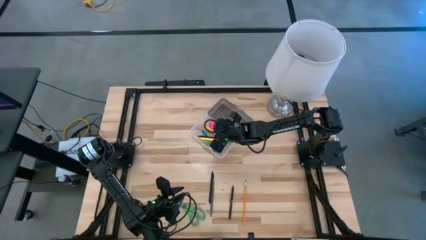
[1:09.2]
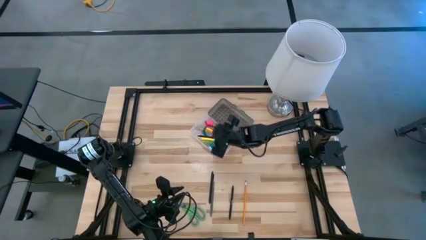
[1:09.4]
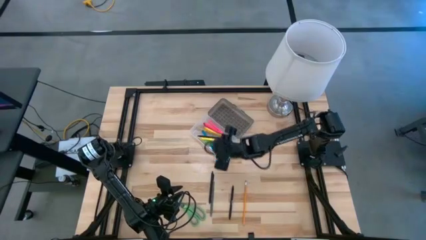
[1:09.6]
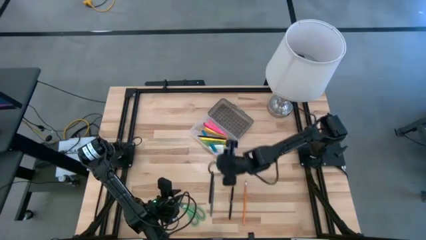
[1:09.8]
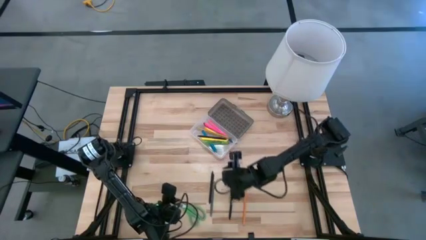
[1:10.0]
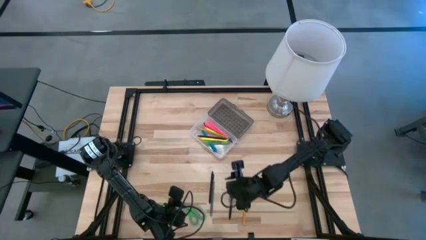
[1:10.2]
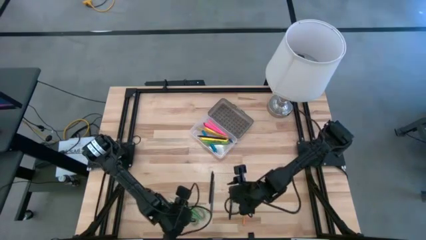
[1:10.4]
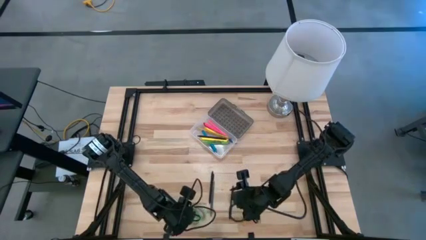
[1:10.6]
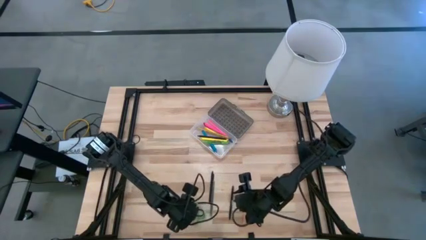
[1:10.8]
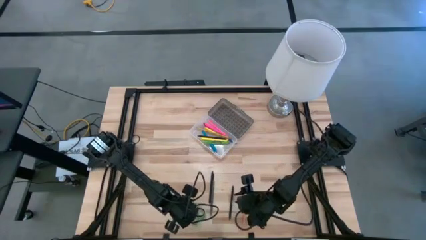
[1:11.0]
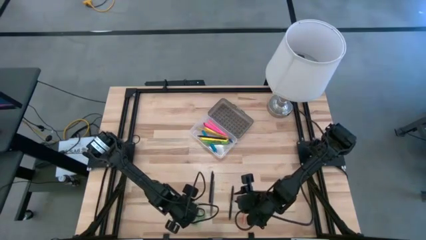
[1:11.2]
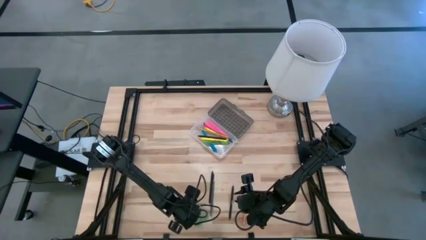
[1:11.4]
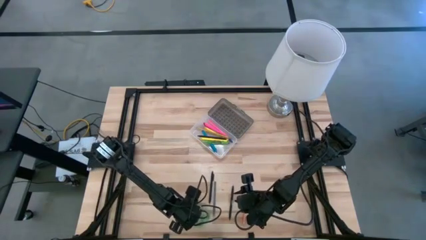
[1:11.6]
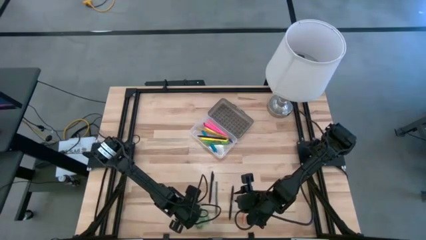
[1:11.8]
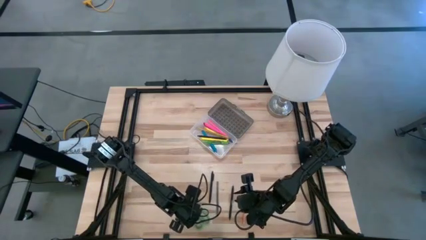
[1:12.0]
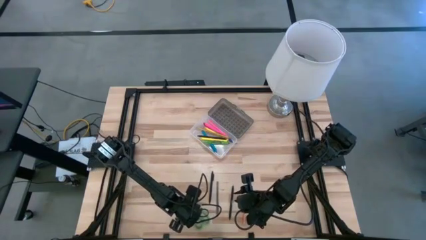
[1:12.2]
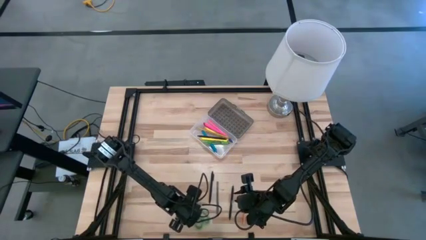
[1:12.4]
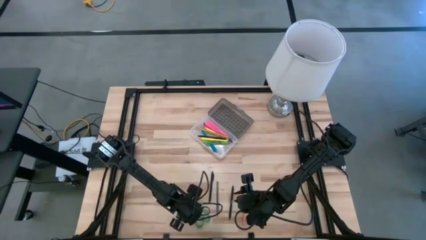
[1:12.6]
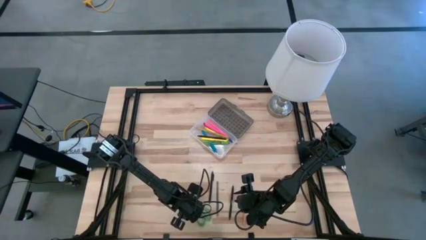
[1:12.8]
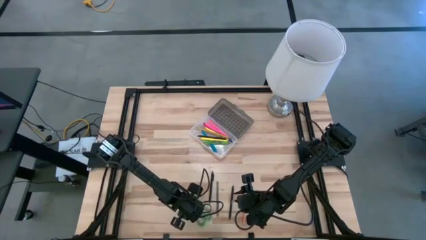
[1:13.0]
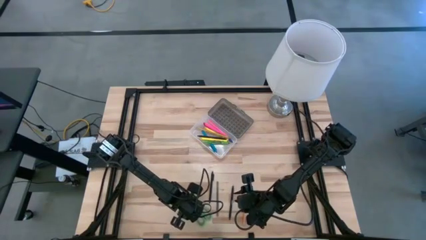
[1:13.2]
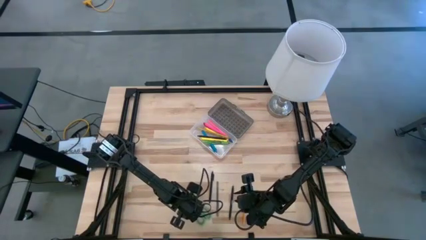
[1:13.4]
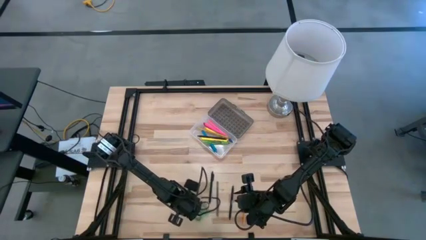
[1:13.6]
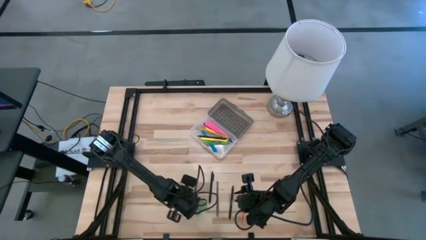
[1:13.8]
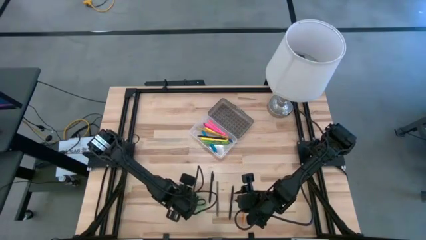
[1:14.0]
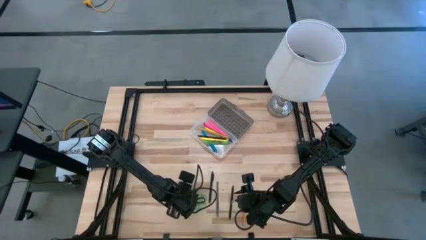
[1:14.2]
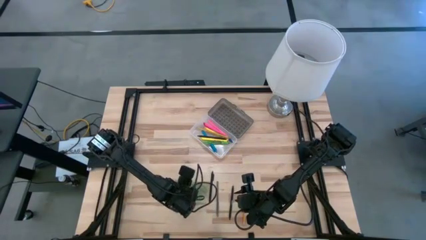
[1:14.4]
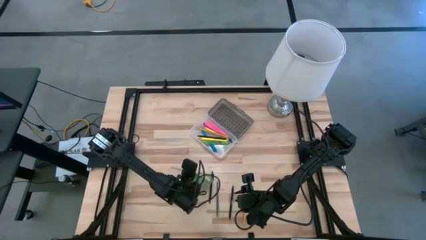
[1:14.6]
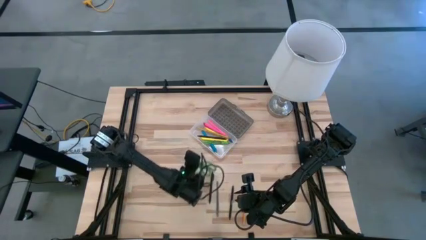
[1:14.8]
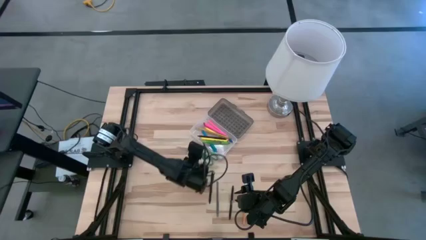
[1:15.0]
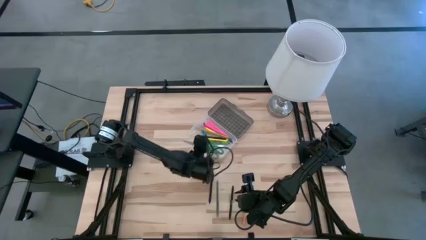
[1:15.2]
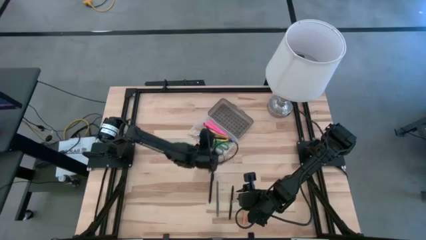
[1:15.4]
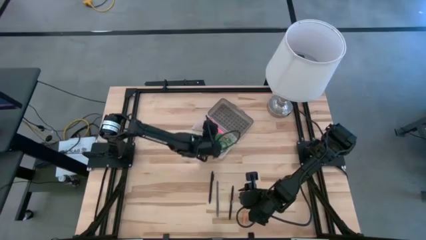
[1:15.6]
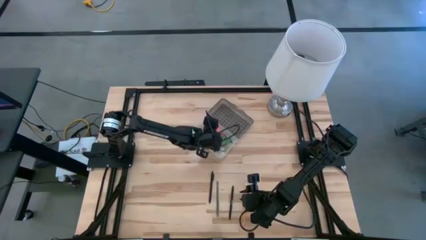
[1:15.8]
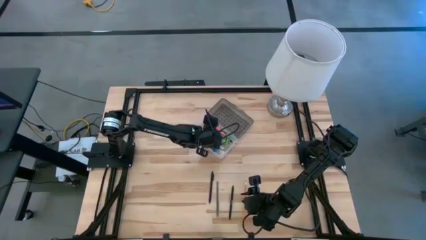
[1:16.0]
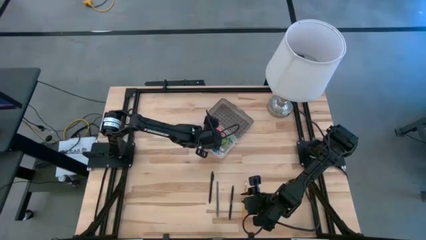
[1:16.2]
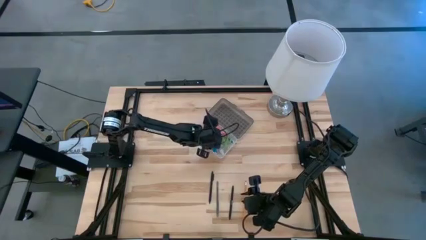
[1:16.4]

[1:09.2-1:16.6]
Task: Pick & place school supplies into a supply box
Put the green scissors into the black supply box

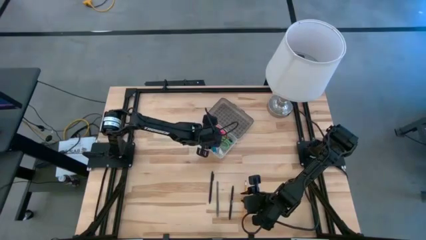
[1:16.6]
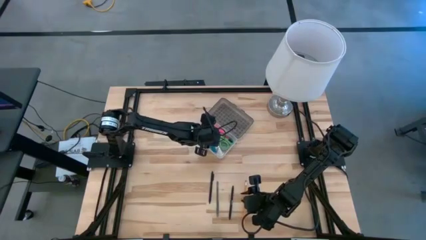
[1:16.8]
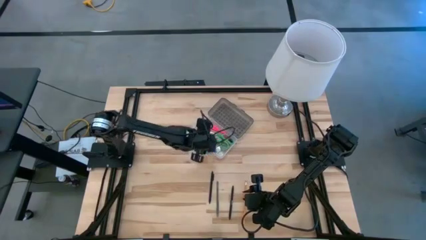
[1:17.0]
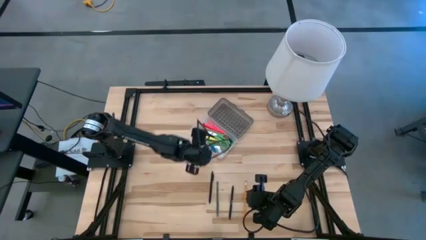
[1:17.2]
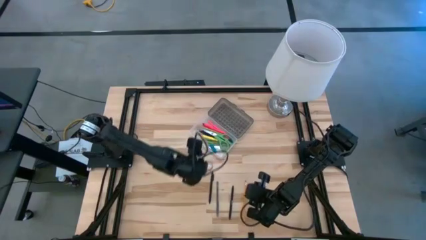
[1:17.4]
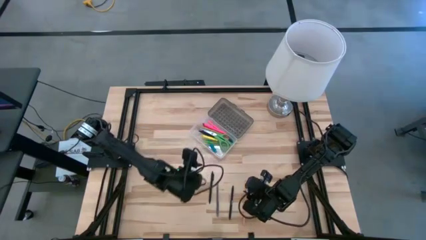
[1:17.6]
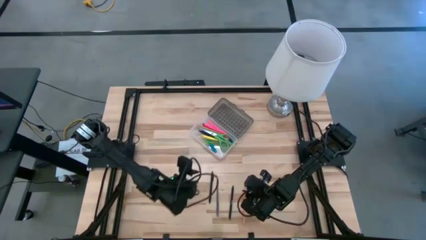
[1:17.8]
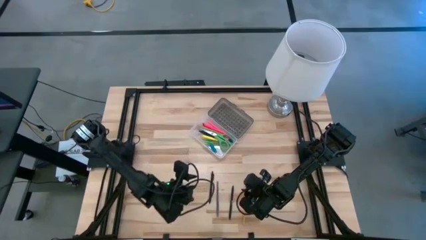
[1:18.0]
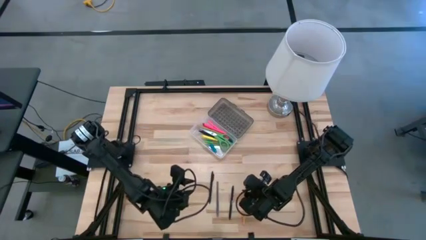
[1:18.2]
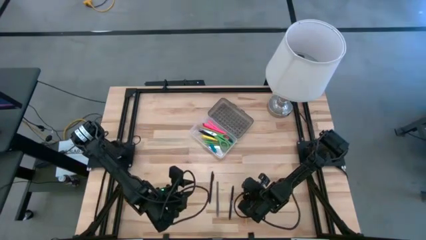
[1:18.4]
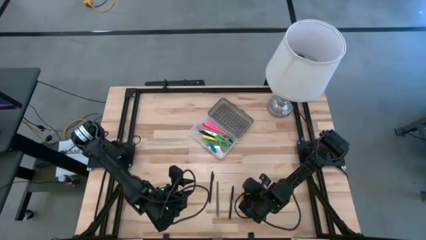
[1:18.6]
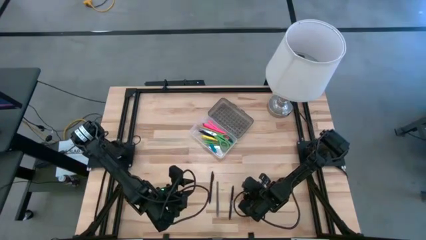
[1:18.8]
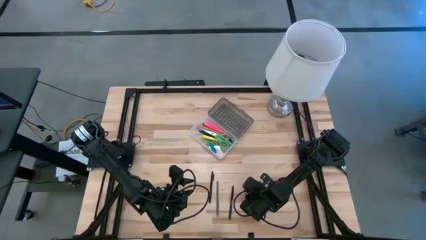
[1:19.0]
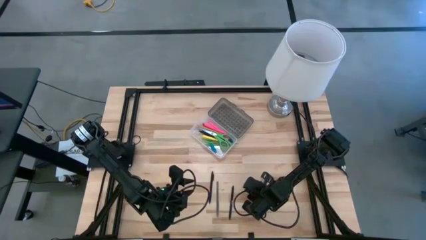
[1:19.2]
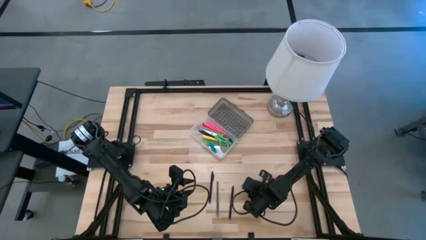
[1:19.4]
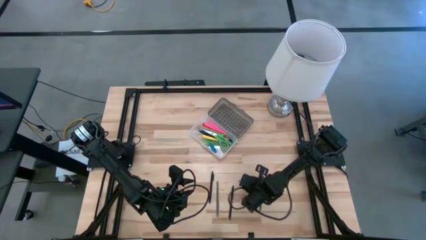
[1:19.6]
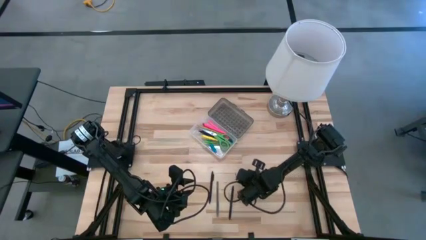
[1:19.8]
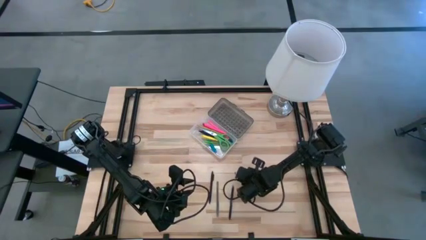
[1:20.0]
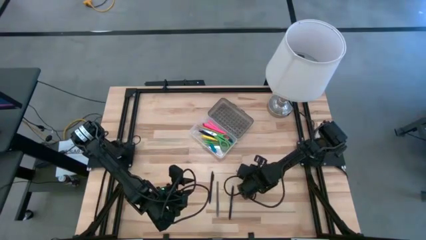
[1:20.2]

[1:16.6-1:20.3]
Put the orange pencil into the black supply box

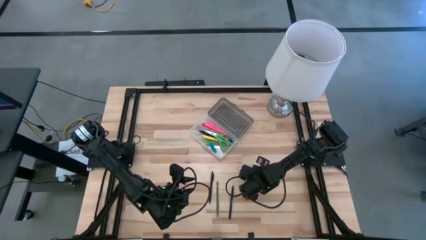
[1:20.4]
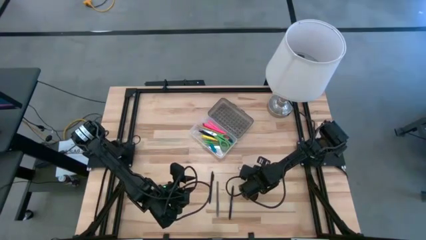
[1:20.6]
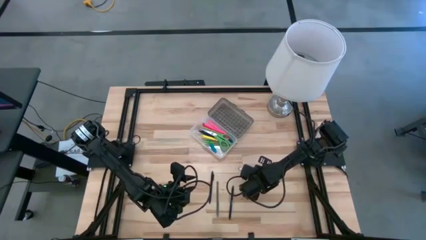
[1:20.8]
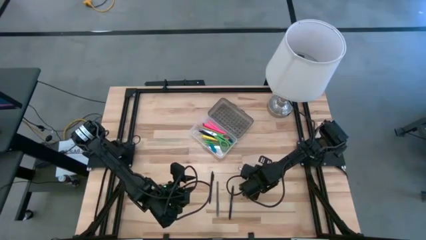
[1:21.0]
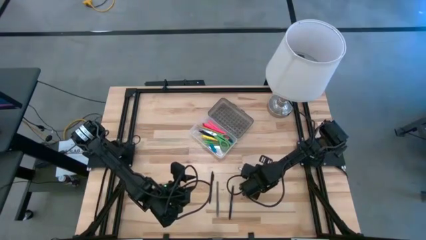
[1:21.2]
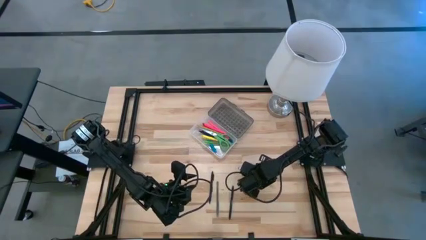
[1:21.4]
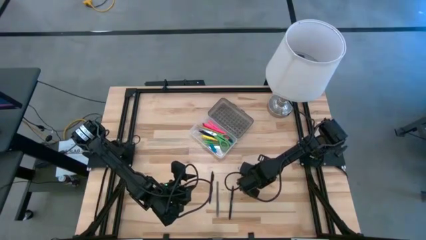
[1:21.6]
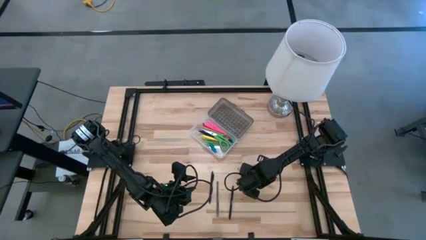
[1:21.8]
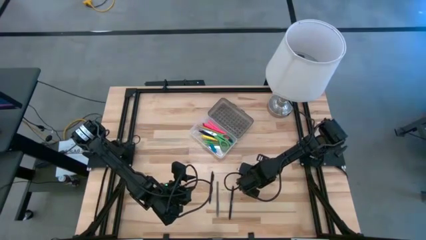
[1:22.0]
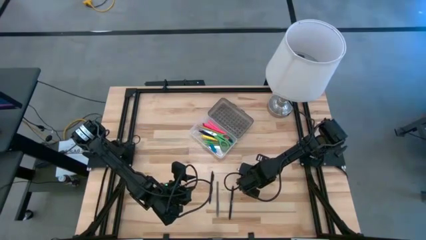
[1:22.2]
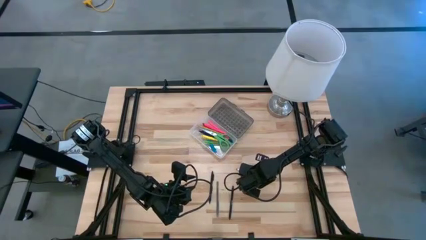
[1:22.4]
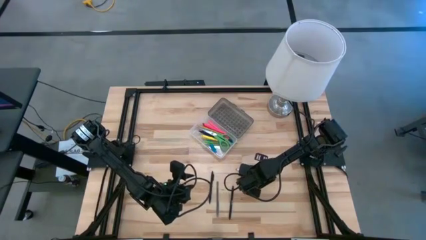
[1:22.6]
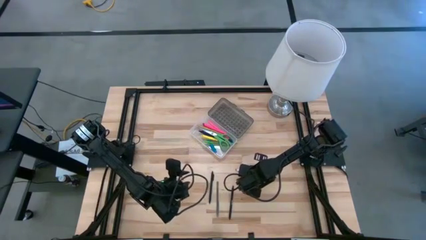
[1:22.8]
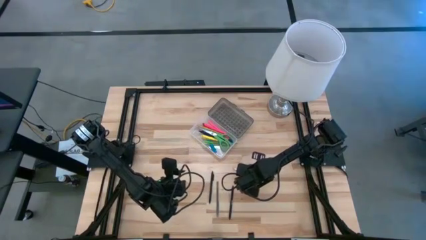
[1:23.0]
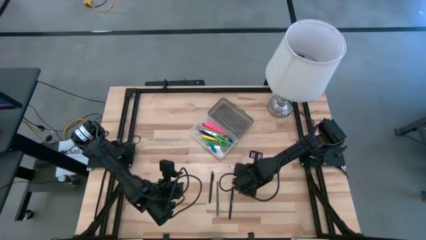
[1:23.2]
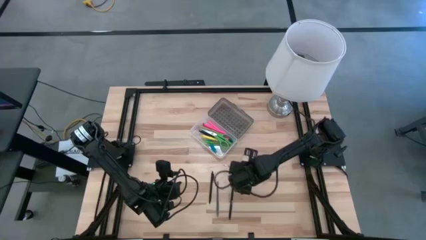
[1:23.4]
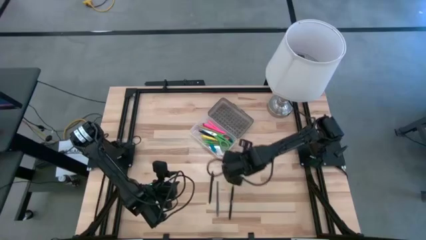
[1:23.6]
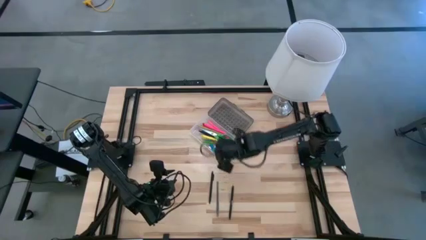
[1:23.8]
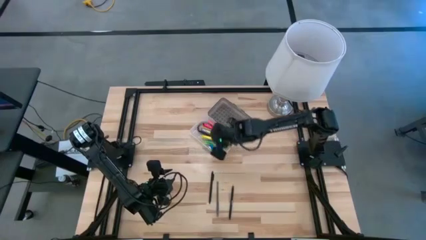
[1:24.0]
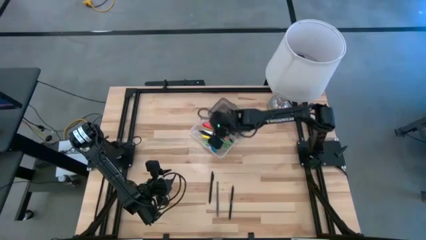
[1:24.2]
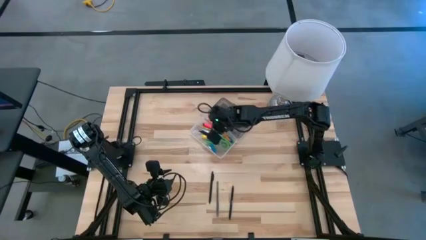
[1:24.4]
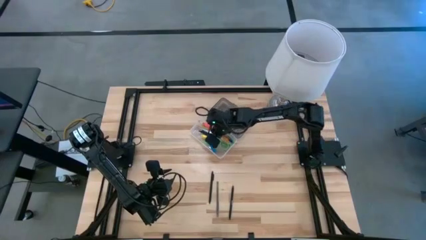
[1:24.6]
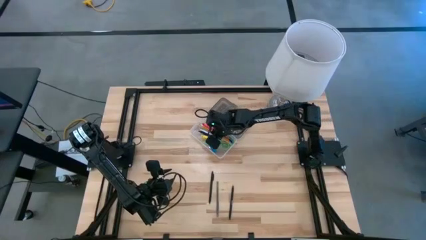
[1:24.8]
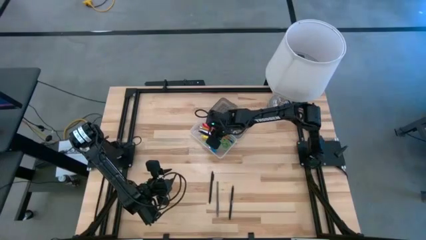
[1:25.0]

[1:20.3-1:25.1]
Put the orange pencil into the black supply box

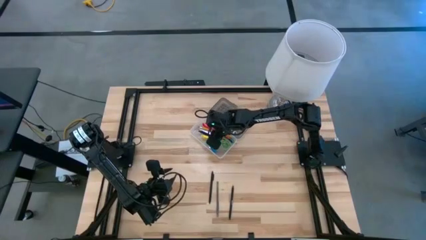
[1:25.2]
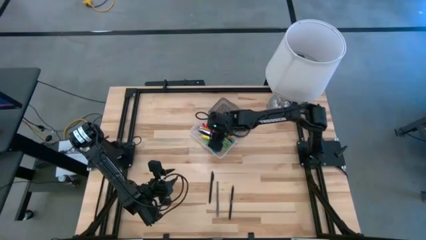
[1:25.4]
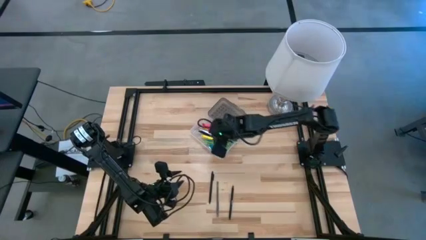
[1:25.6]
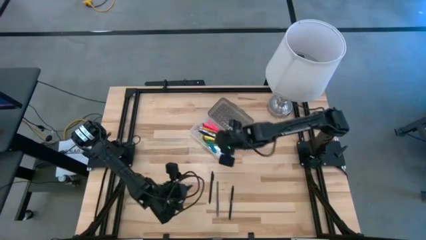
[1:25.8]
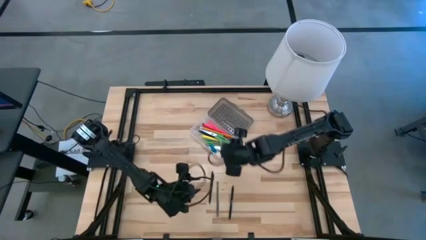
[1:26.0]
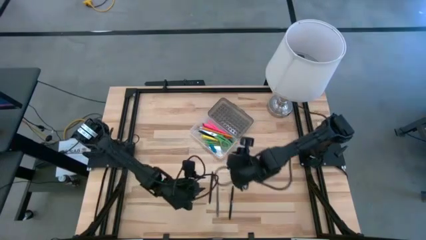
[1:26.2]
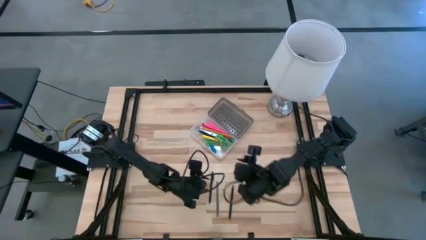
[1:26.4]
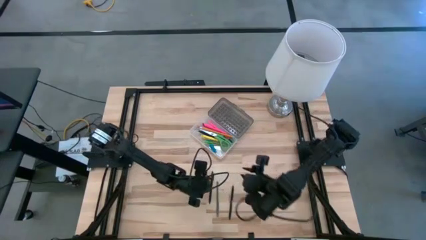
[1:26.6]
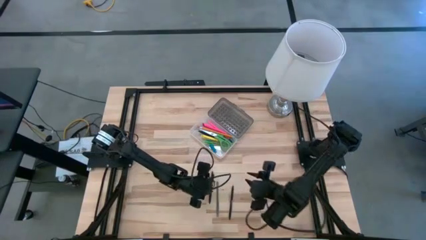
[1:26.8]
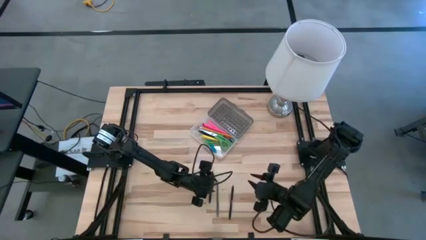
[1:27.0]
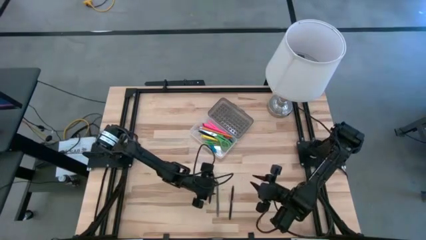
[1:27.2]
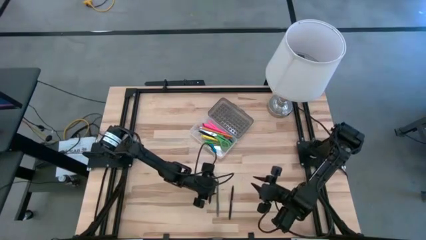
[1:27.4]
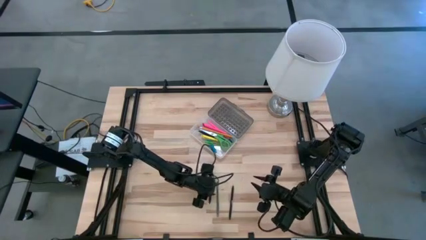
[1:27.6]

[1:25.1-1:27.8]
Put the left black pen into the black supply box
